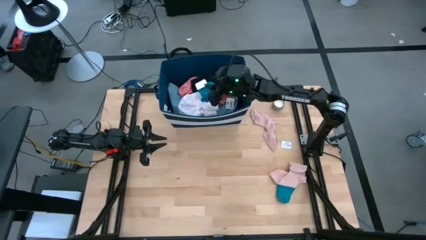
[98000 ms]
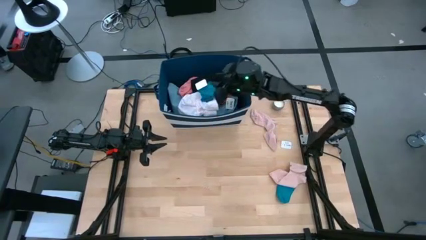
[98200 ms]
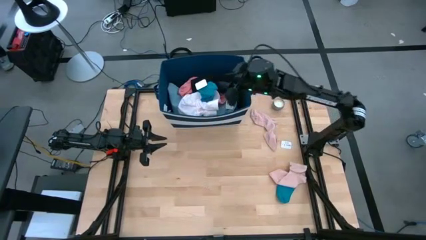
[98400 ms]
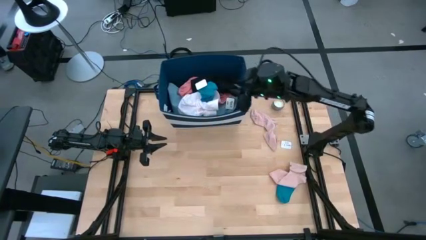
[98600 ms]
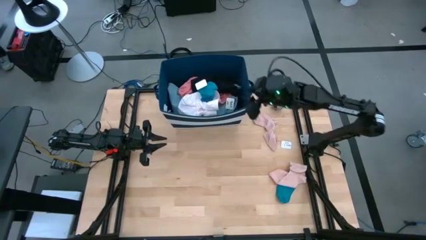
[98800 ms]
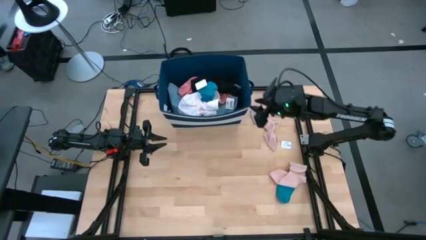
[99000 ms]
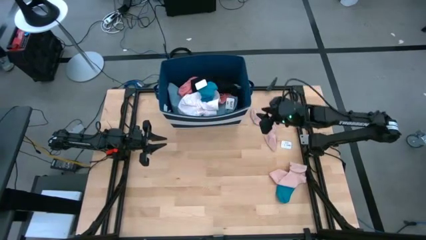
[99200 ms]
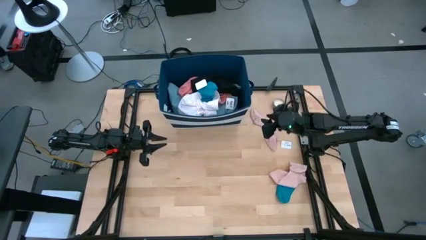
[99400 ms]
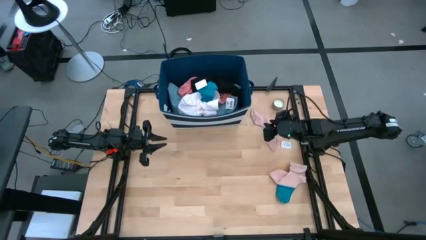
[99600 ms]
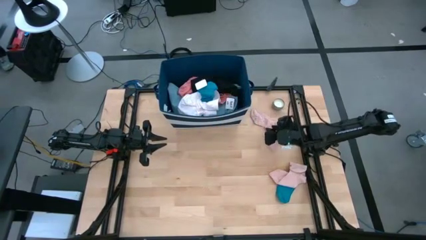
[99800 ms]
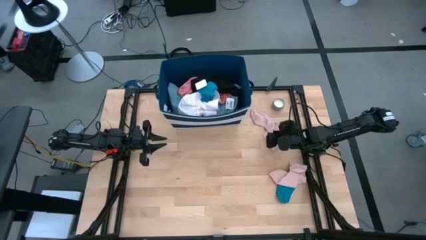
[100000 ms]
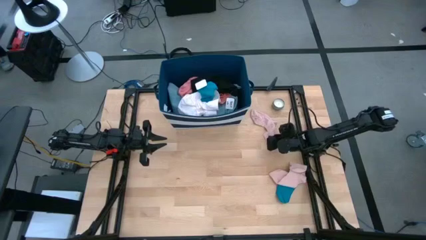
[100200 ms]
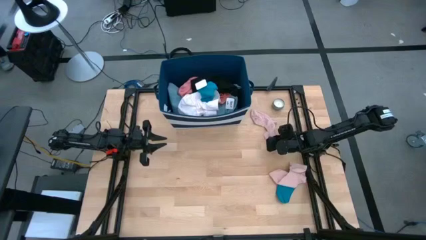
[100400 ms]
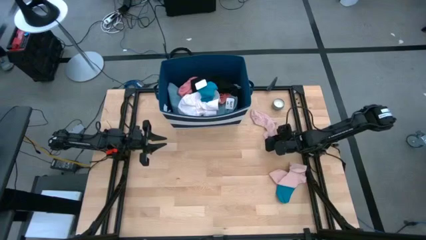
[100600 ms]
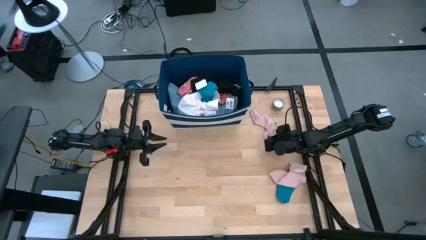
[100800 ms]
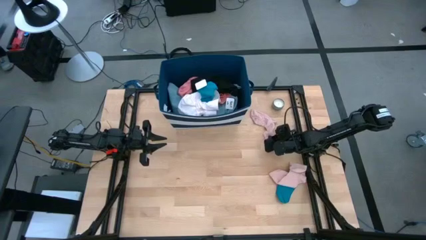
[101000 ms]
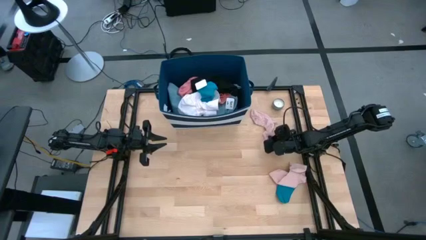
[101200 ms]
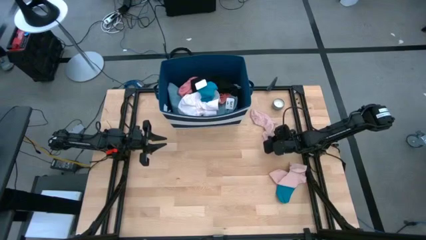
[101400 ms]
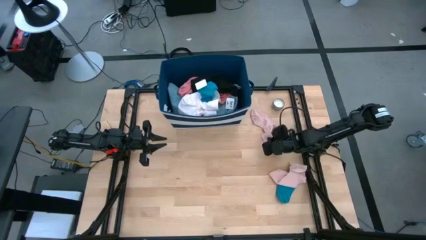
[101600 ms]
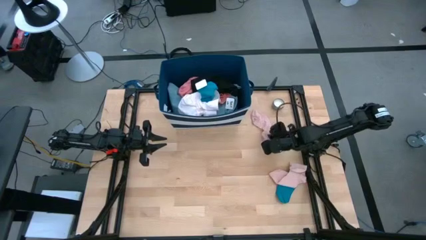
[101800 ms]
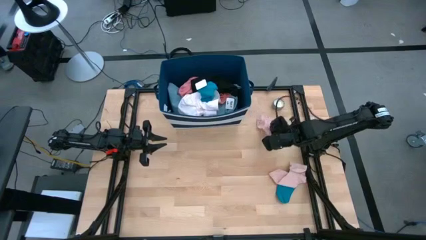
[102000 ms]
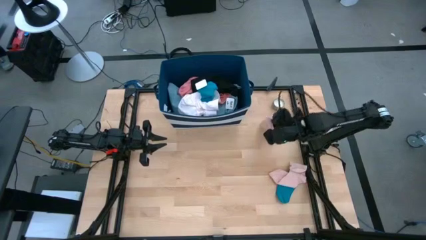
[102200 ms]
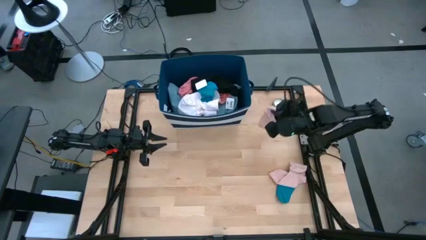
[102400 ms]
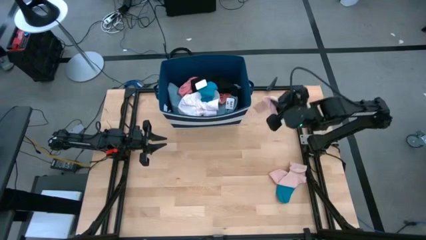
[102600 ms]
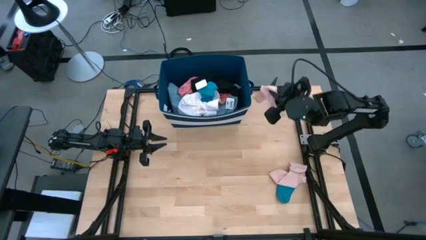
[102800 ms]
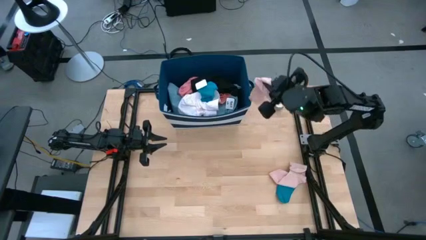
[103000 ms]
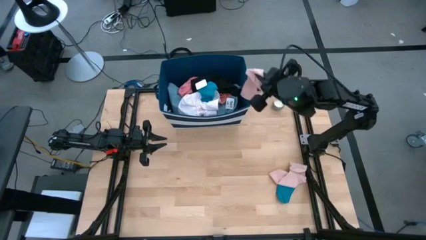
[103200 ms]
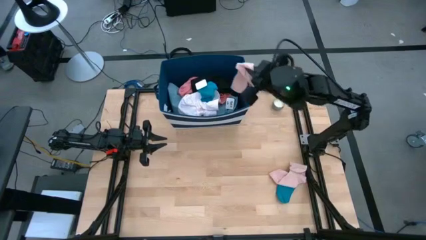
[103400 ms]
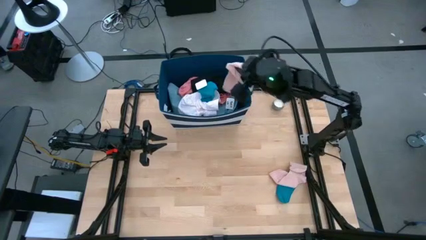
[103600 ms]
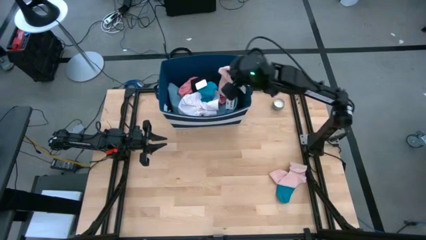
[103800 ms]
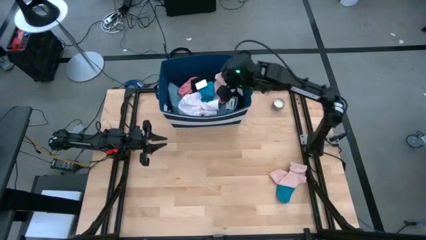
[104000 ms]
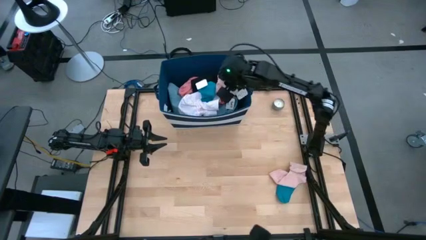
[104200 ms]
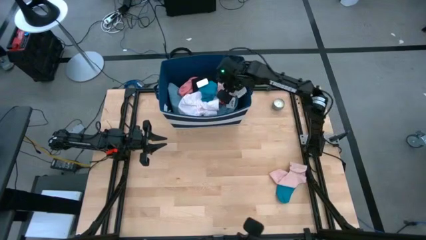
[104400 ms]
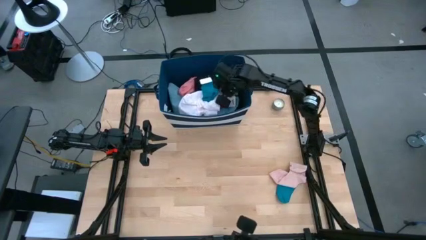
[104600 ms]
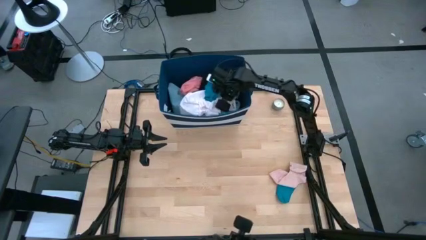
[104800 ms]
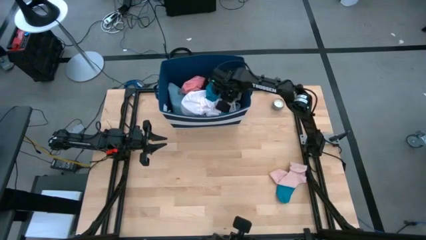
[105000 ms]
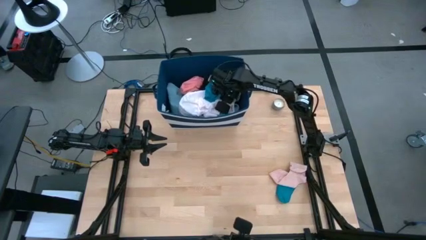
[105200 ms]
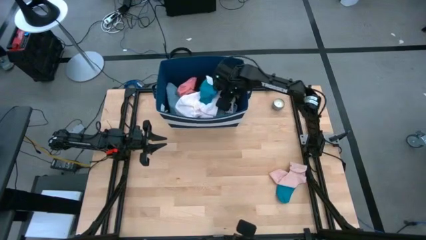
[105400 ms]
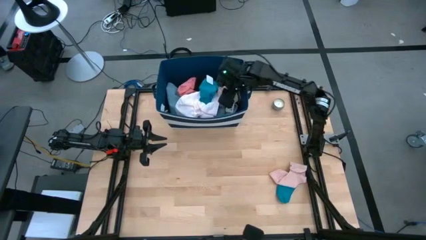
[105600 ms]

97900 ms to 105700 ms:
Task: Sort clothes
Put the top pink sock into the blue bin

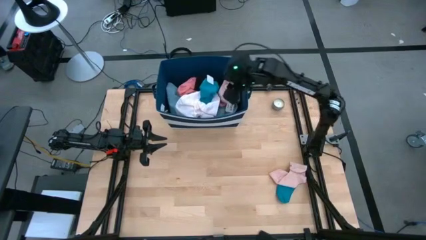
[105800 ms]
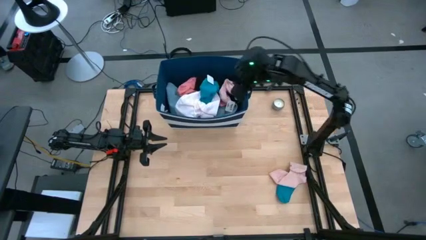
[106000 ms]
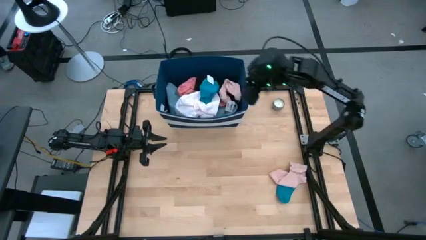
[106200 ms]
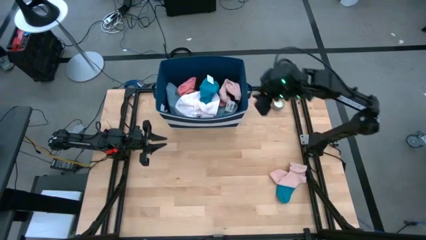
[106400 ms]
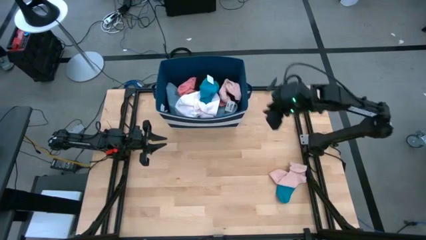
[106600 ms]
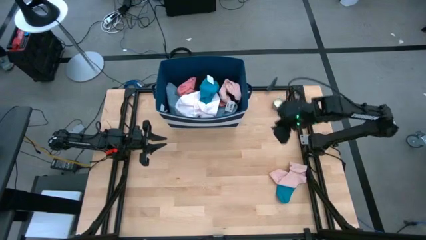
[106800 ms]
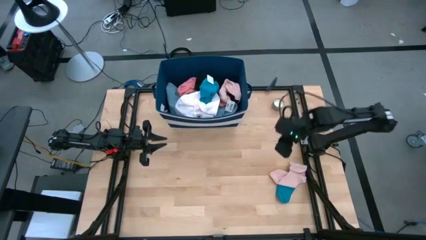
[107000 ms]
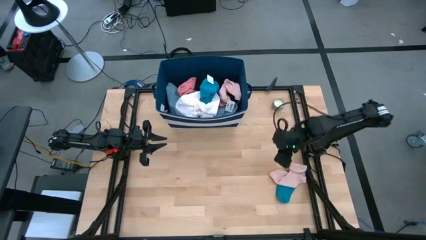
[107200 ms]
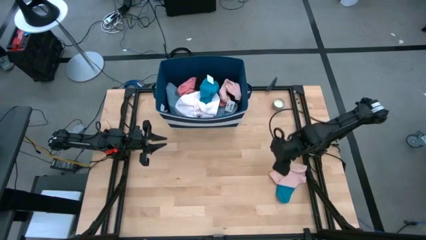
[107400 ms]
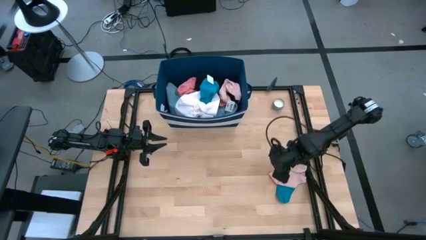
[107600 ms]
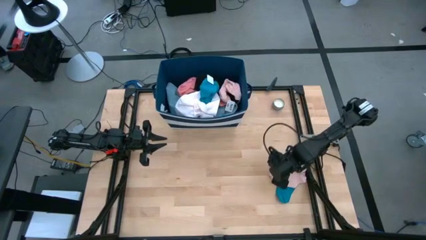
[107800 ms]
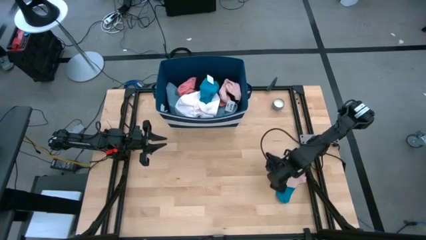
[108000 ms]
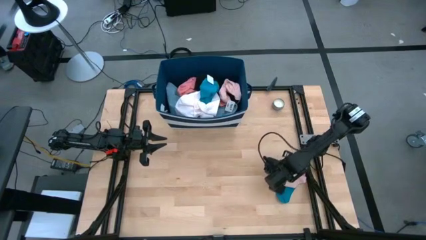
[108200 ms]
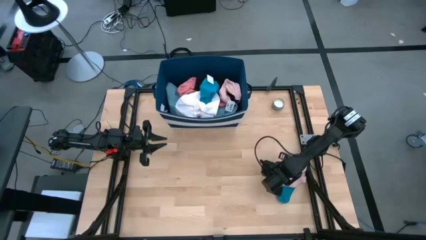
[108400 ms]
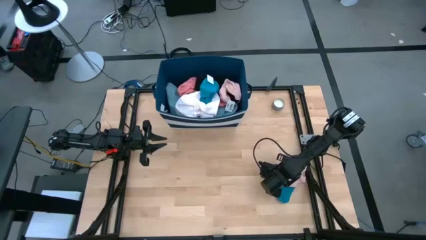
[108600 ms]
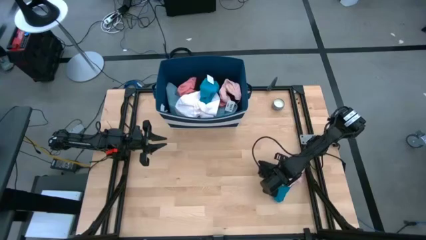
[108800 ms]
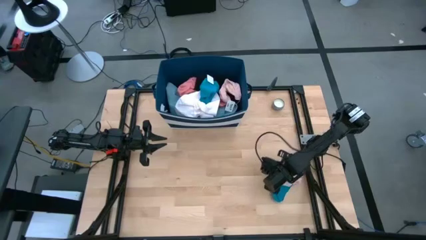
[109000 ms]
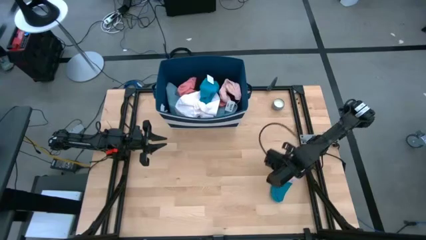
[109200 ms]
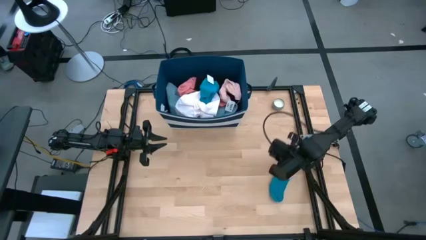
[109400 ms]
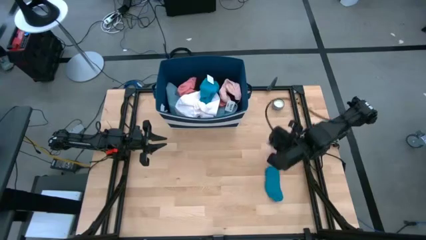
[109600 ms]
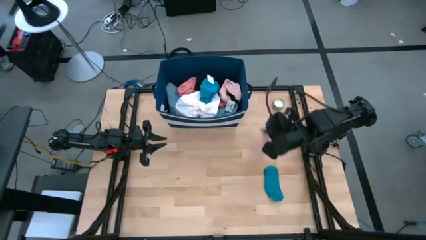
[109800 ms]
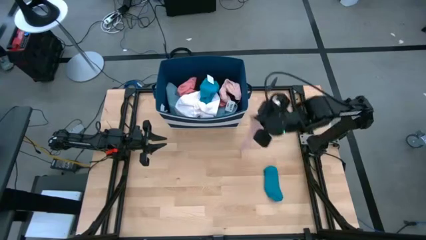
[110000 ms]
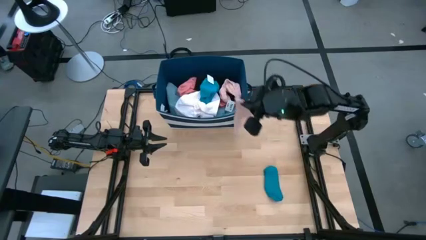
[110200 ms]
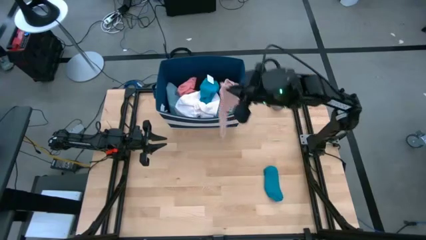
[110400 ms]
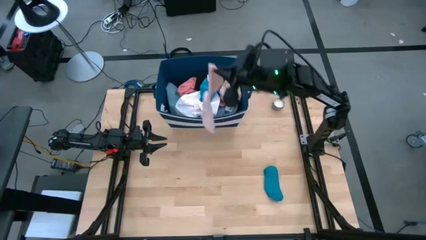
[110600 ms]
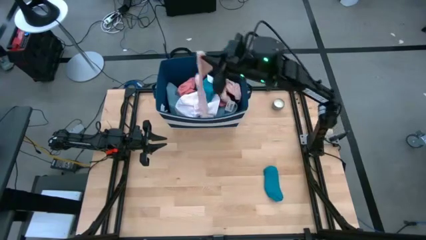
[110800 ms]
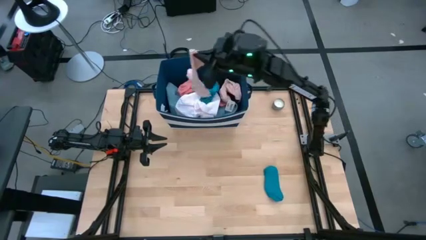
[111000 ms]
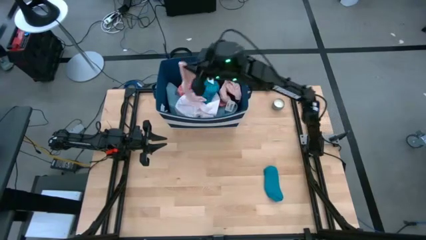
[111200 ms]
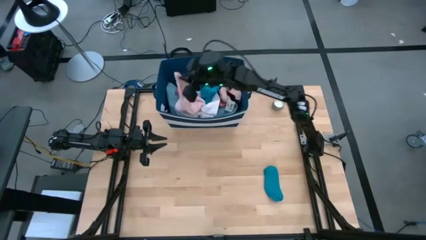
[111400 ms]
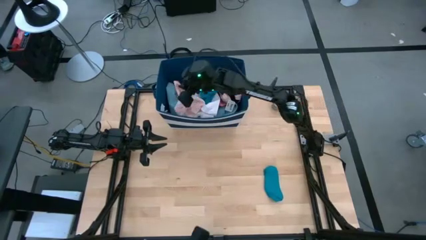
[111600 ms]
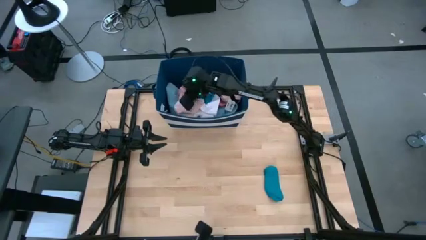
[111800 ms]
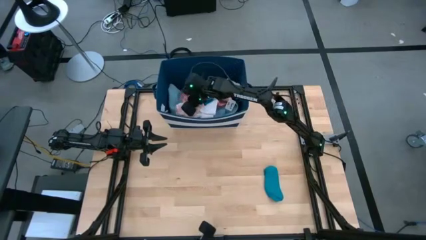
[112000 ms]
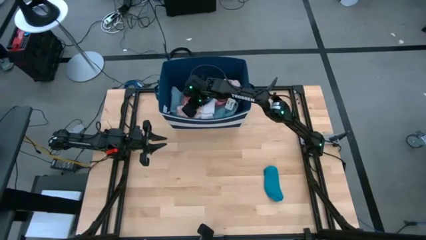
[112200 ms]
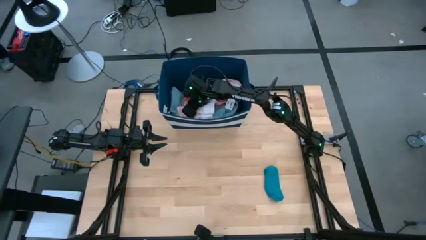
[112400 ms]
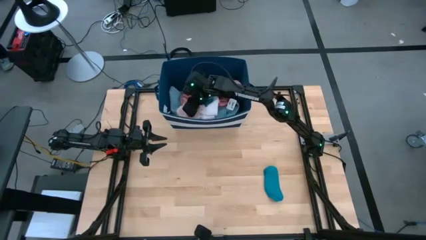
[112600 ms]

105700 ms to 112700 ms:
Put the pink sock into the blue bin
